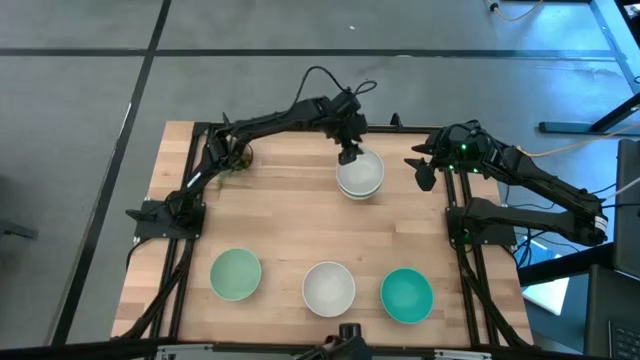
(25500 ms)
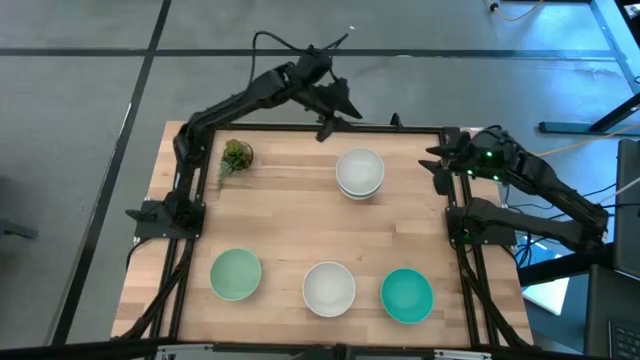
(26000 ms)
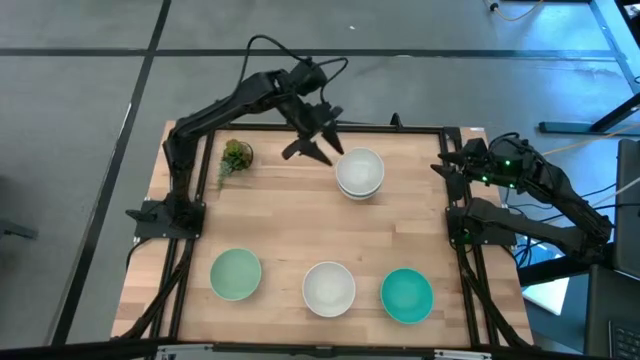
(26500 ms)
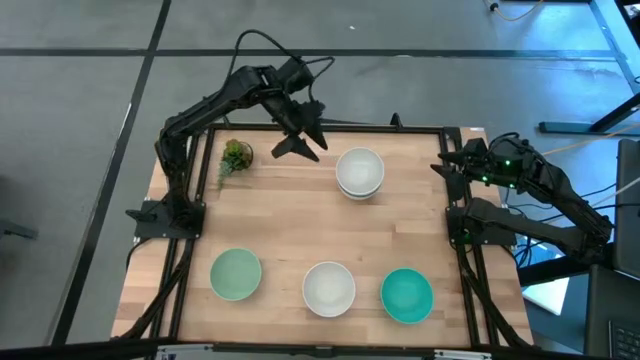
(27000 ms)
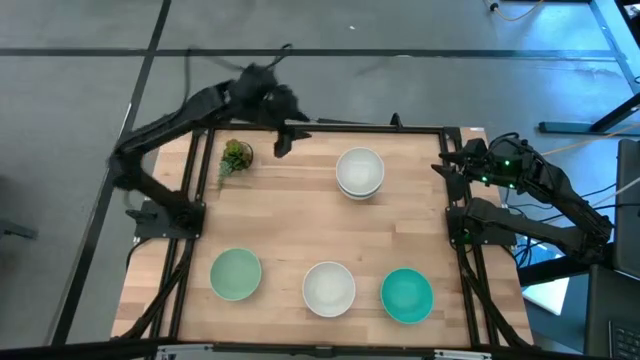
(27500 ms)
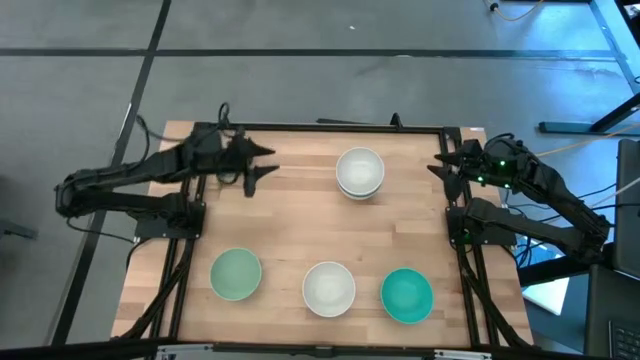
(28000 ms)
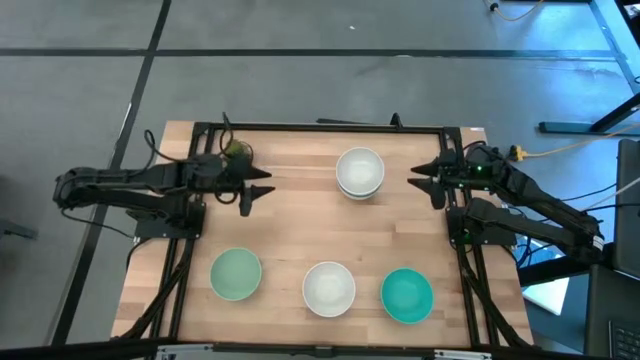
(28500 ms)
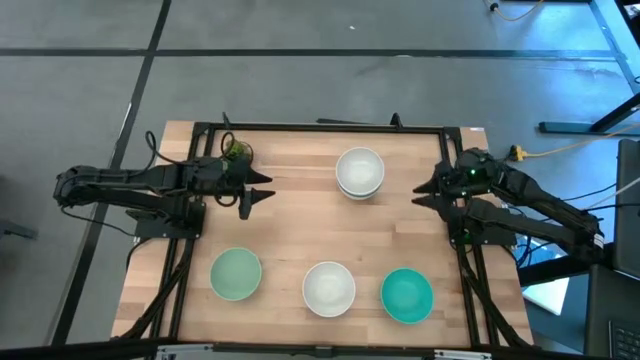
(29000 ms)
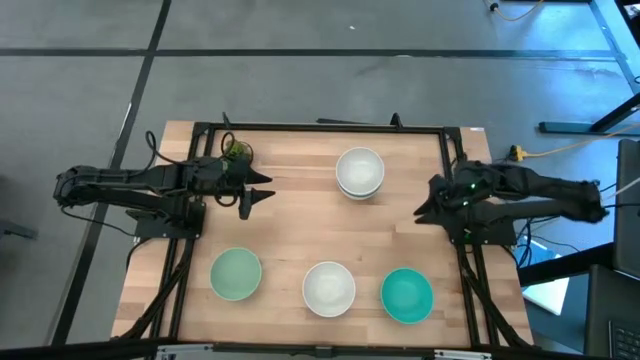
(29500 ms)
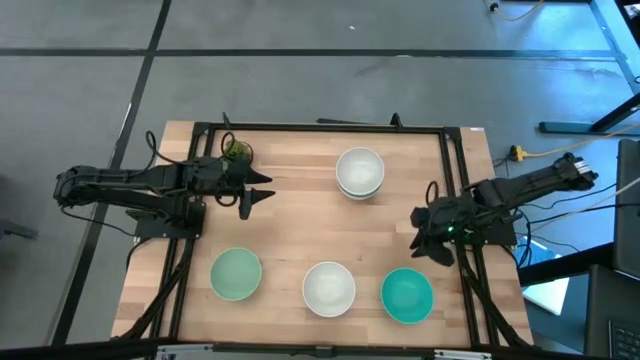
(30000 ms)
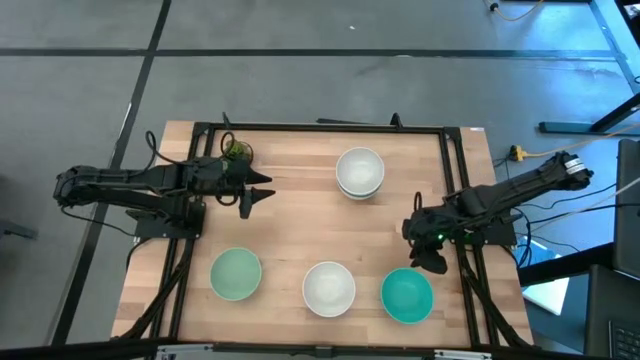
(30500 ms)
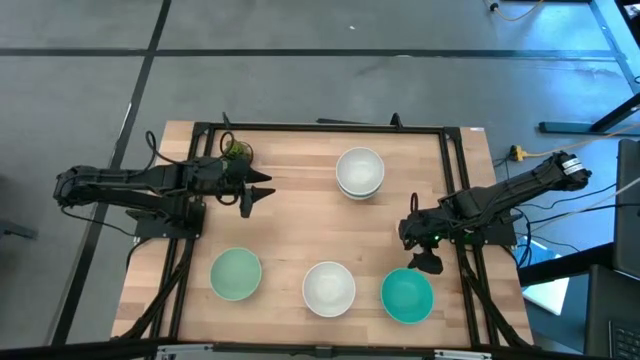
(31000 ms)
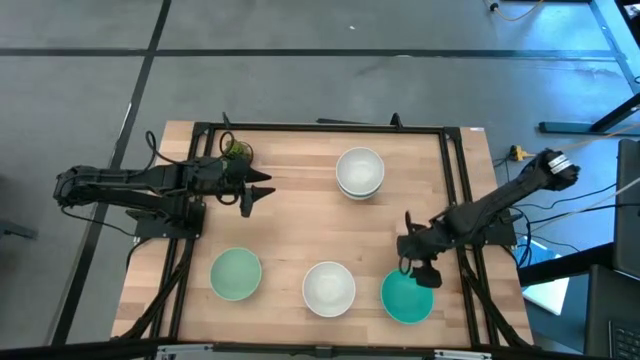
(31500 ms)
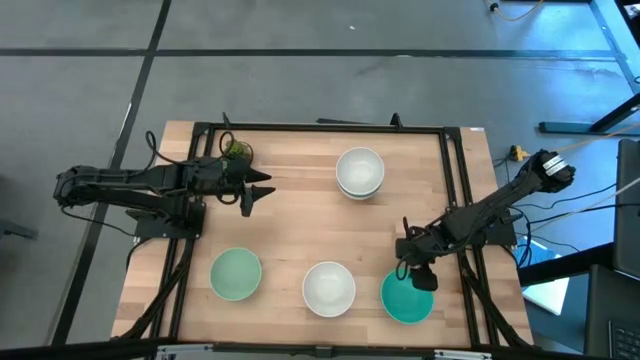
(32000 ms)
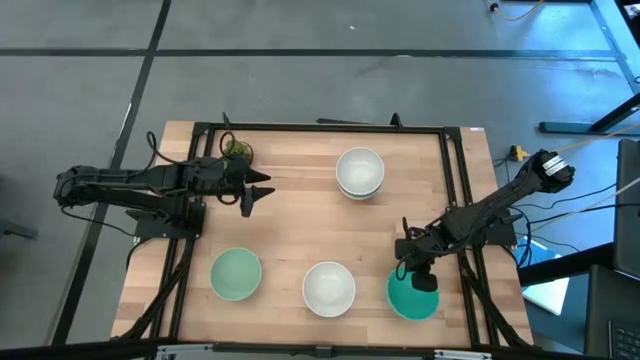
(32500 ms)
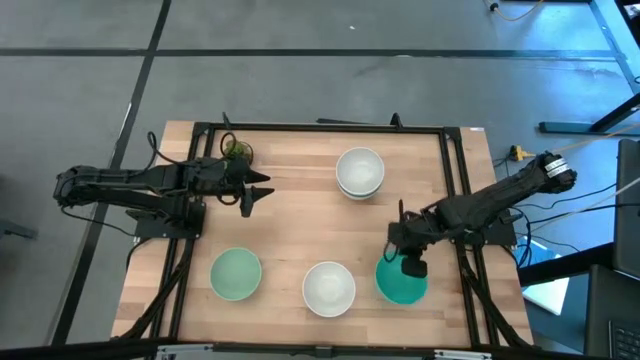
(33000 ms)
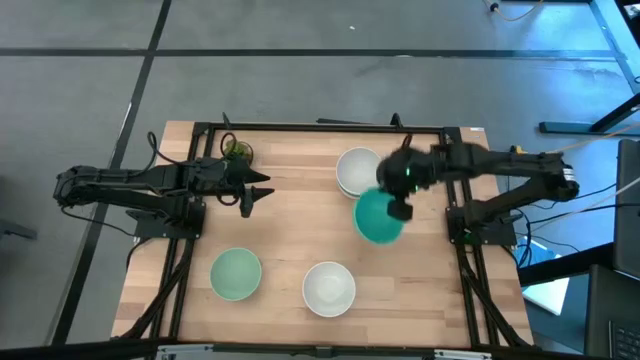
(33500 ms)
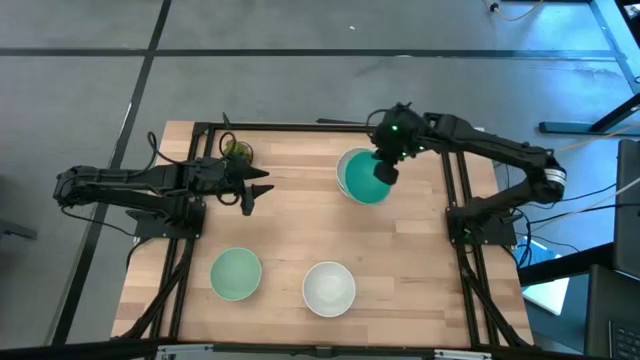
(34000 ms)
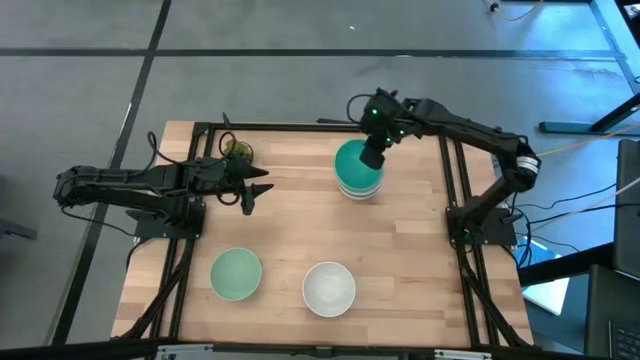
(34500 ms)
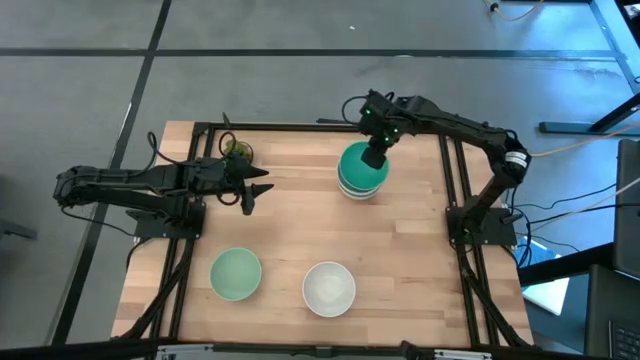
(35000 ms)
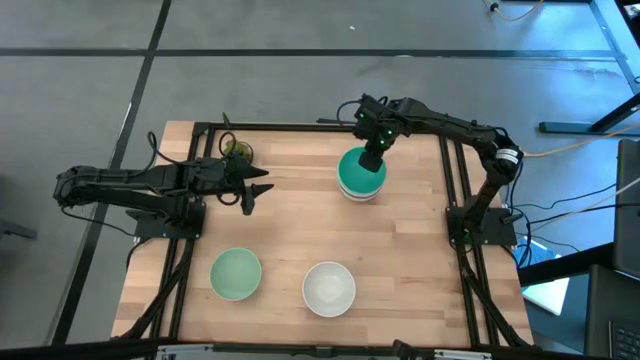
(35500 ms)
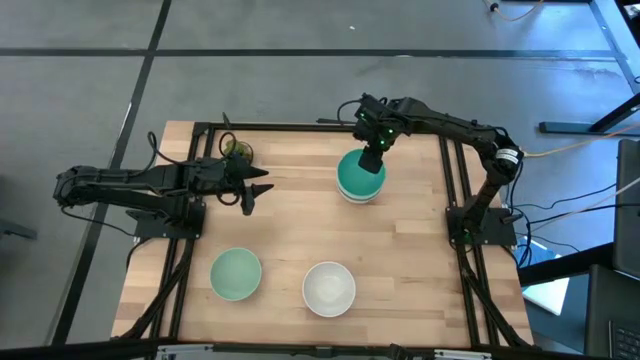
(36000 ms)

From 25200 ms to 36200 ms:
Task: Nest bowls inside each other
Stack the blue bowl on top of the white bowl

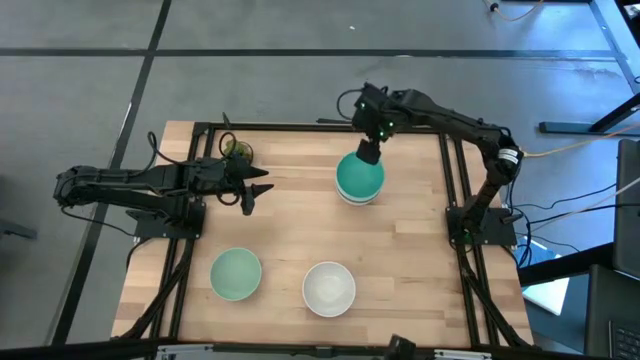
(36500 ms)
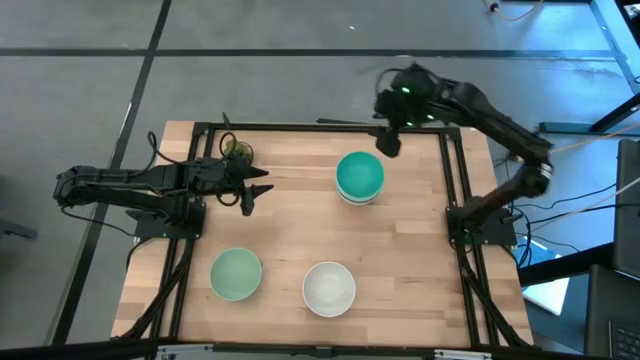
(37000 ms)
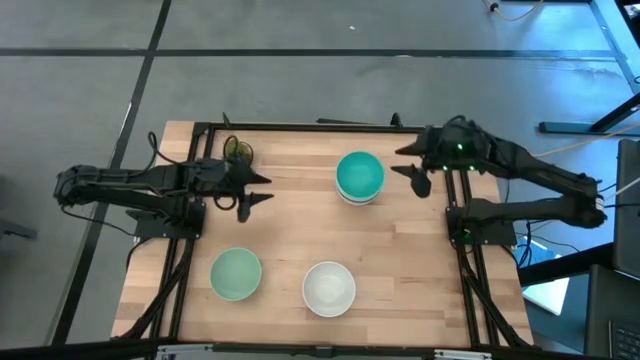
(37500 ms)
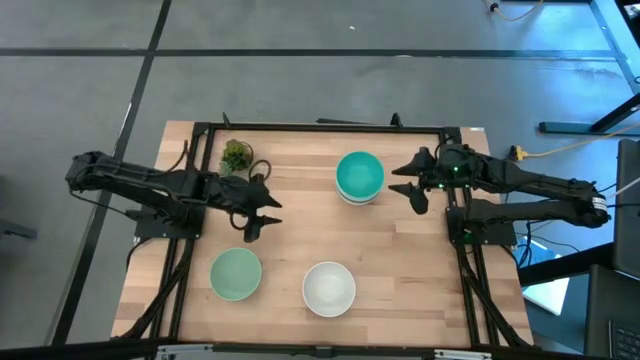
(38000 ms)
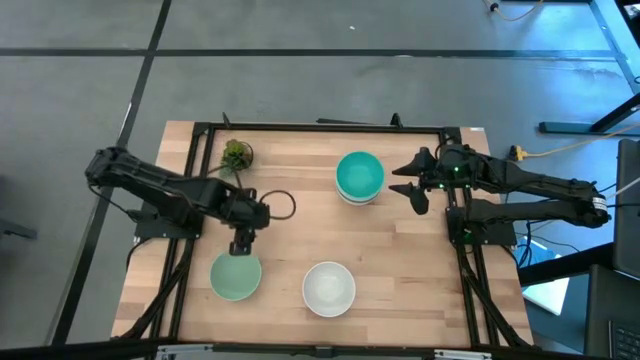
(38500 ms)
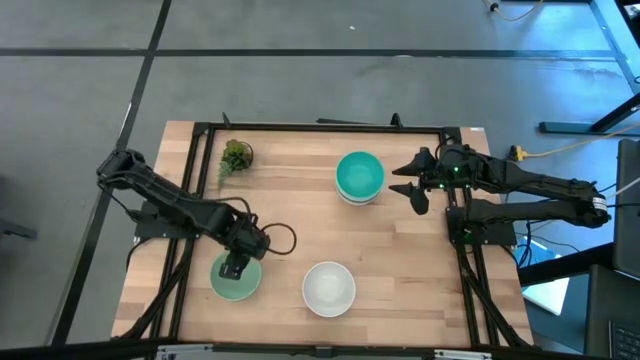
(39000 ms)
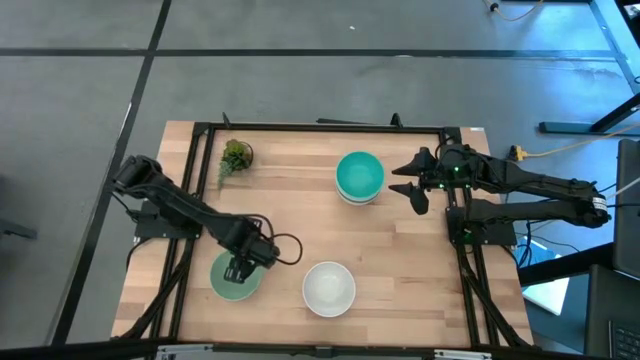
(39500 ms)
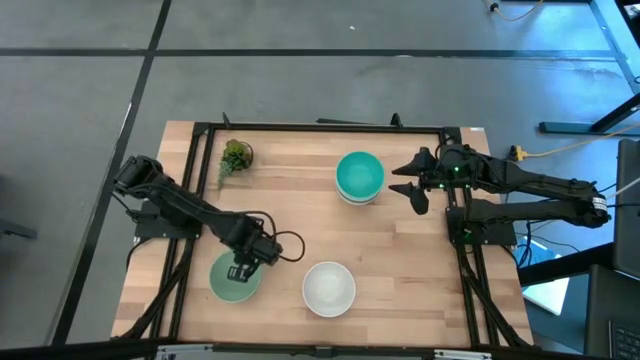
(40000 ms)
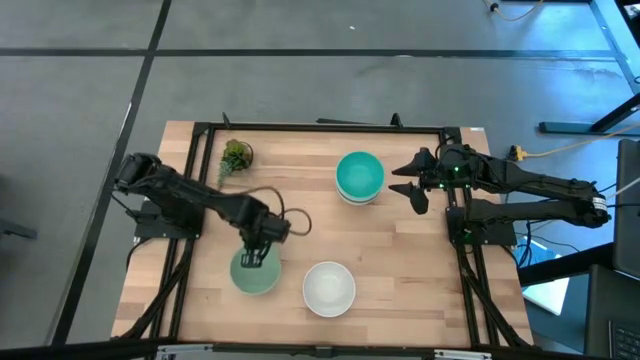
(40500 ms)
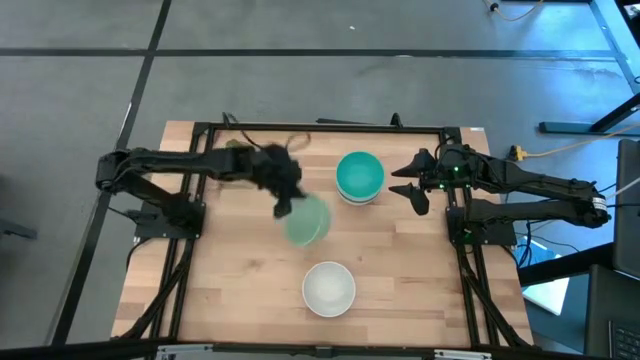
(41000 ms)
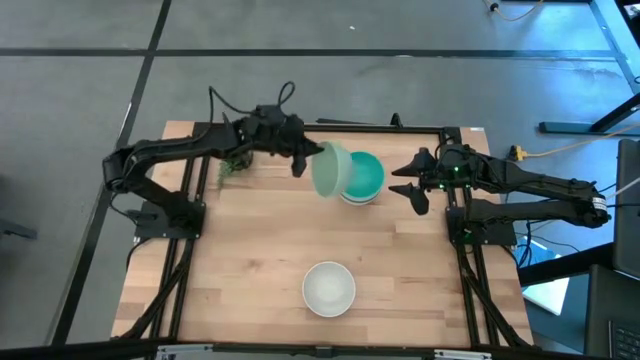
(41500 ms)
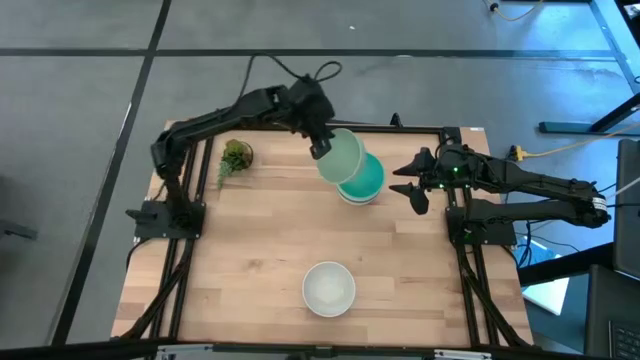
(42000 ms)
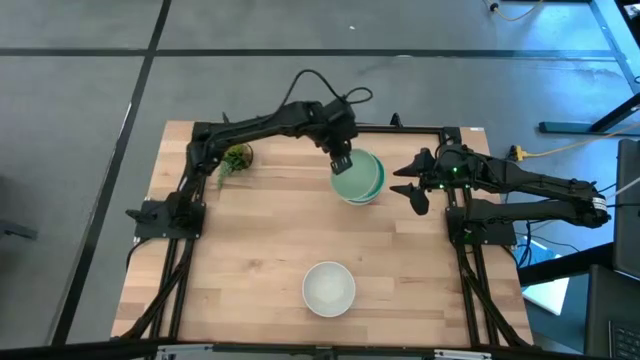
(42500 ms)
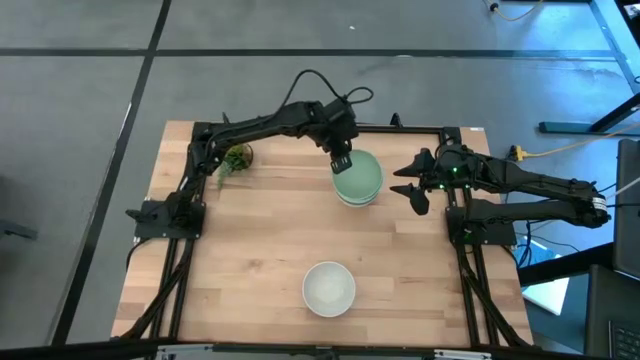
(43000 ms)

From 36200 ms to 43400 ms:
Stack the light green bowl on top of the blue bowl

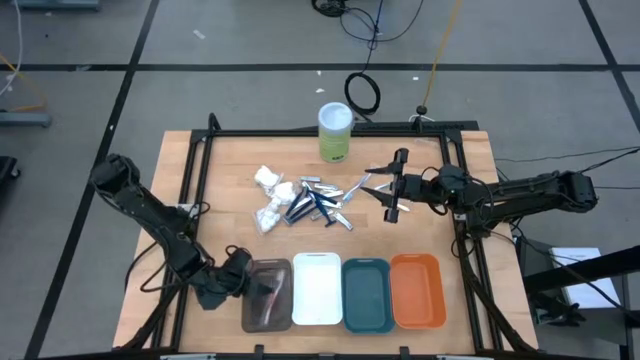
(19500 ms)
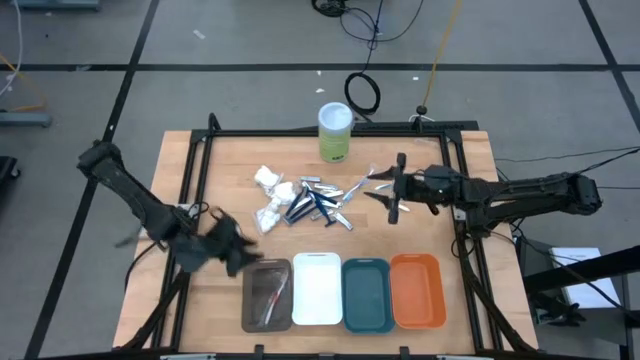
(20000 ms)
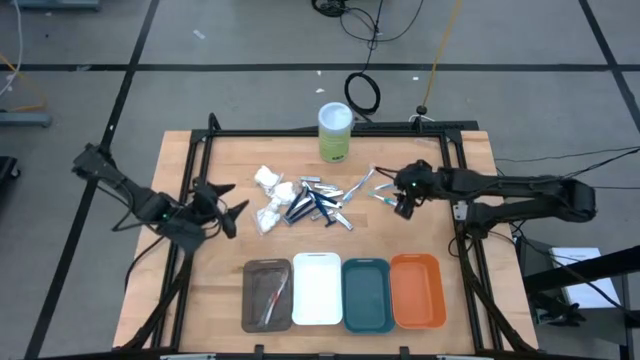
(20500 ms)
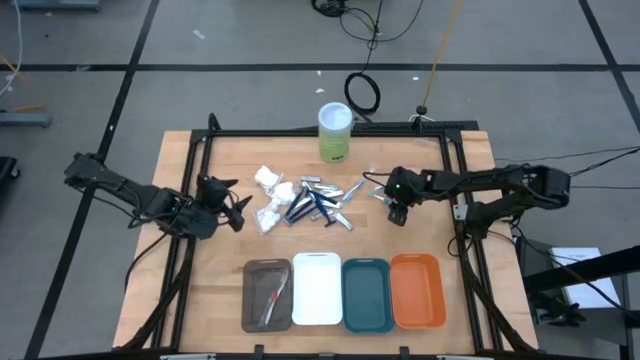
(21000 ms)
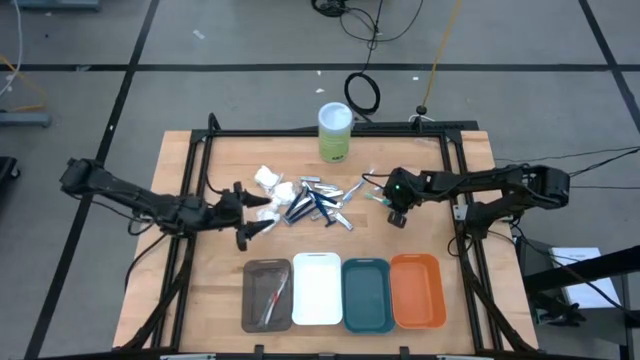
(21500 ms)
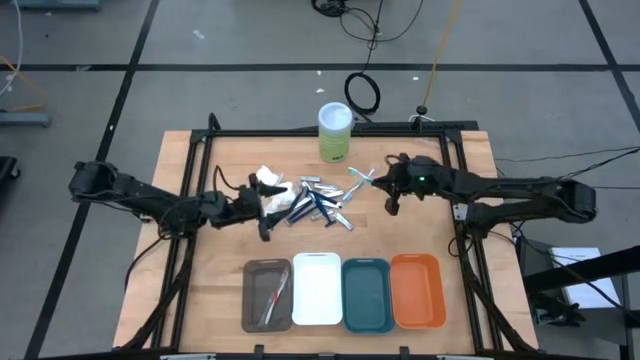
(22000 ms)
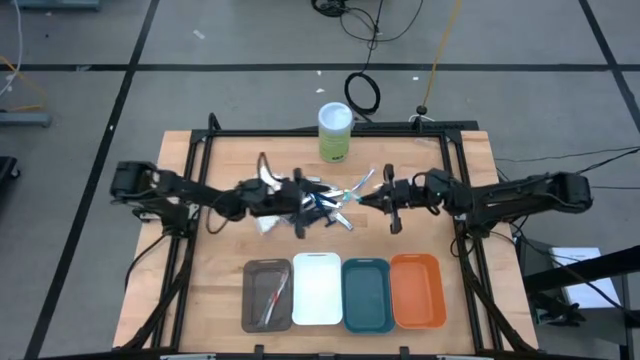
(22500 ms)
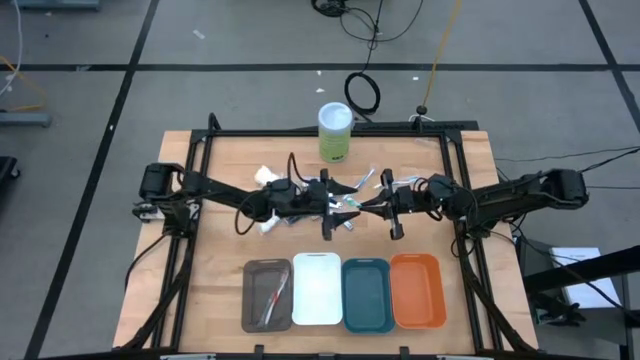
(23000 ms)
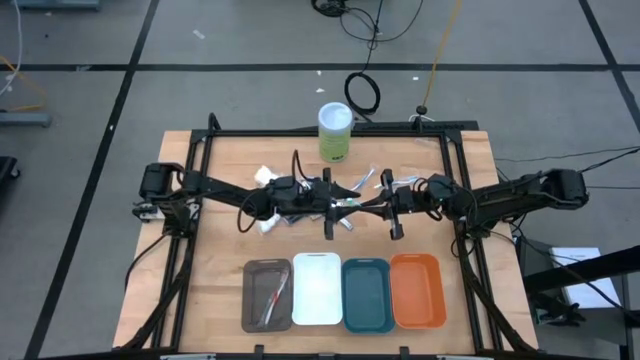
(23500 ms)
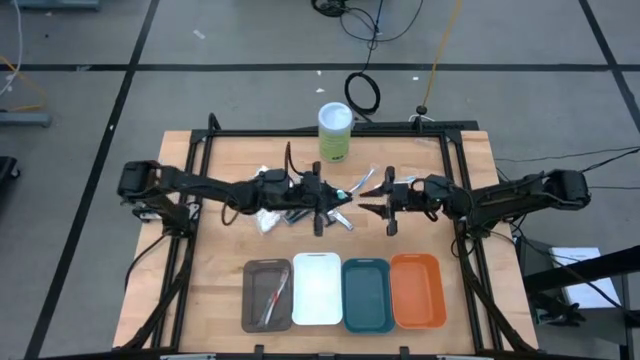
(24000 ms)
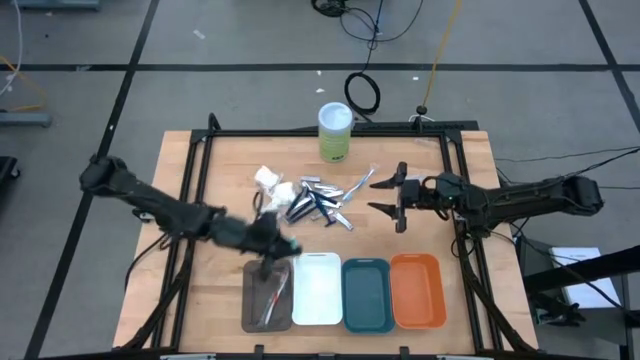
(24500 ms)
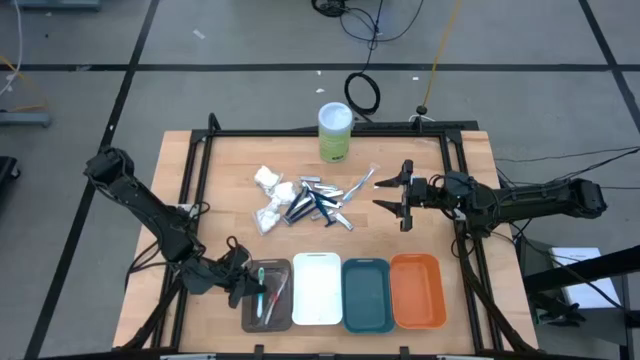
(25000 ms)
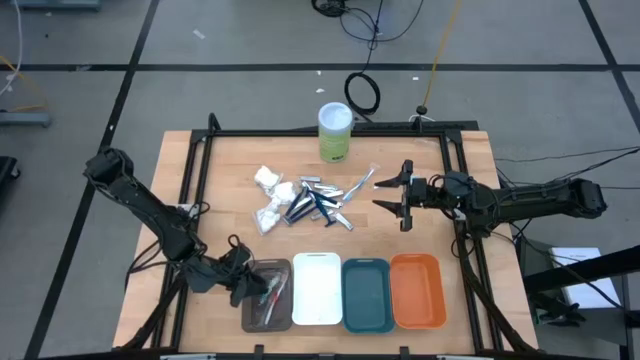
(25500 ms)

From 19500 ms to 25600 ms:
Task: Pick & Place Travel size toiletries
Put the green toothbrush into the black bin
